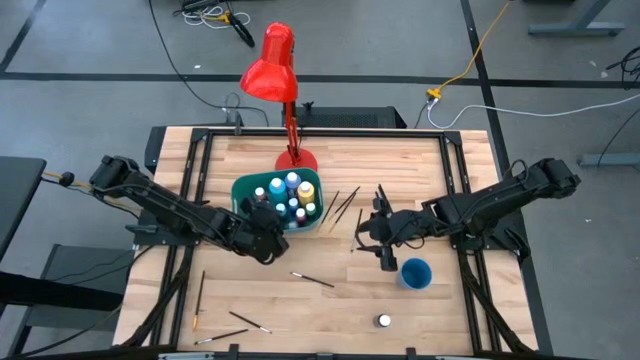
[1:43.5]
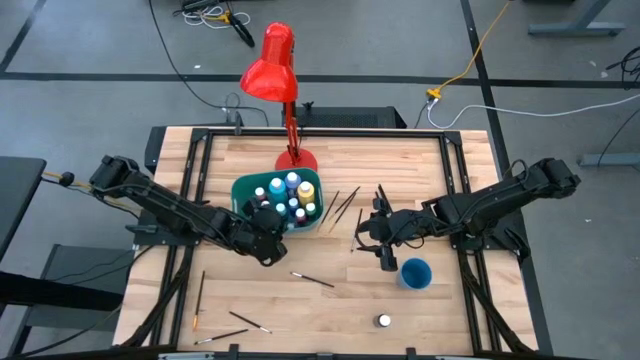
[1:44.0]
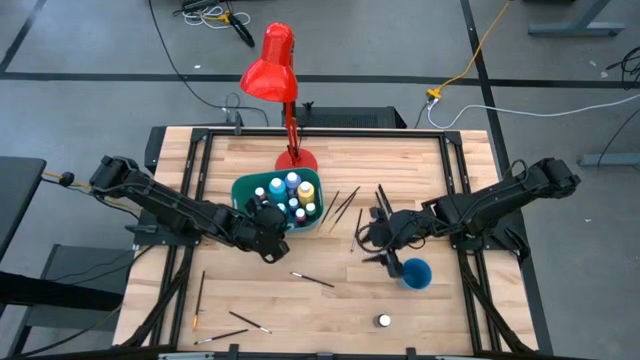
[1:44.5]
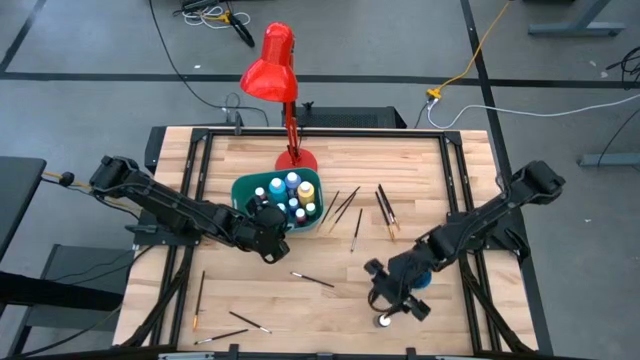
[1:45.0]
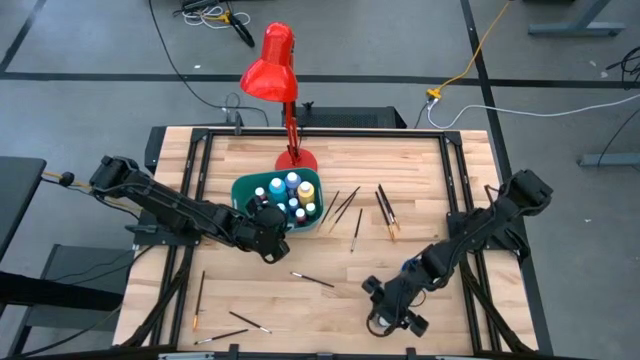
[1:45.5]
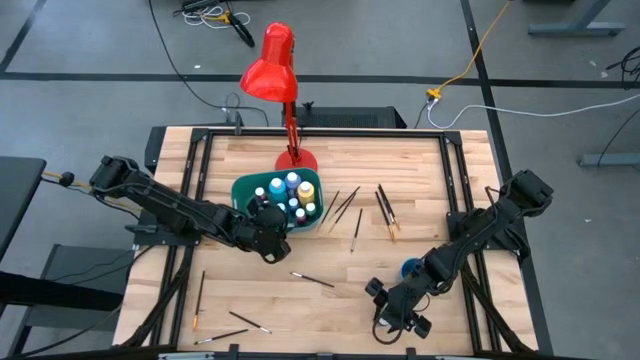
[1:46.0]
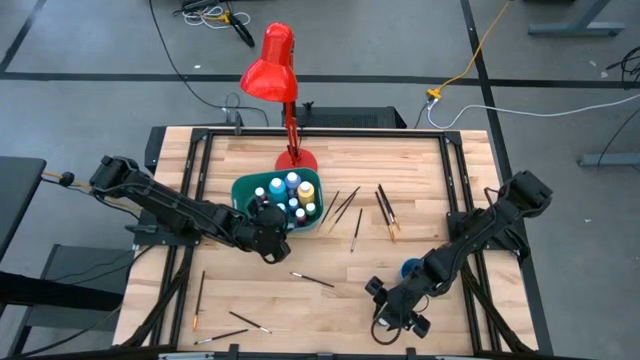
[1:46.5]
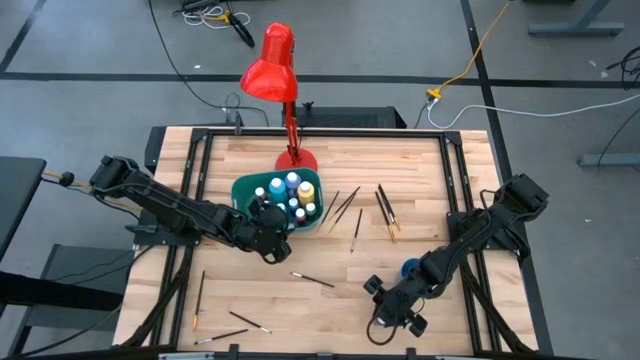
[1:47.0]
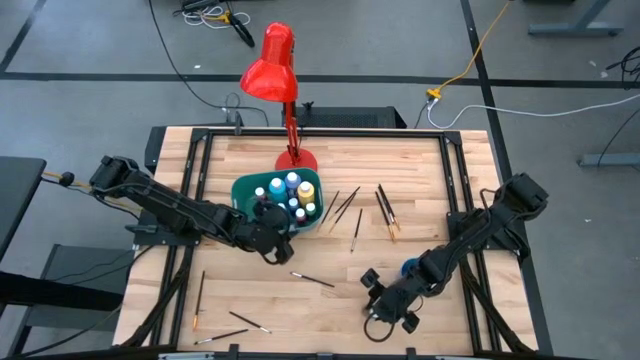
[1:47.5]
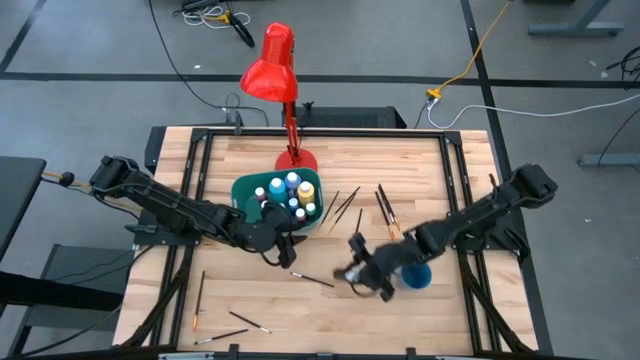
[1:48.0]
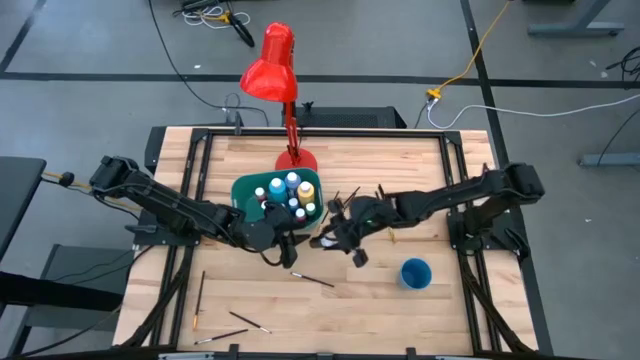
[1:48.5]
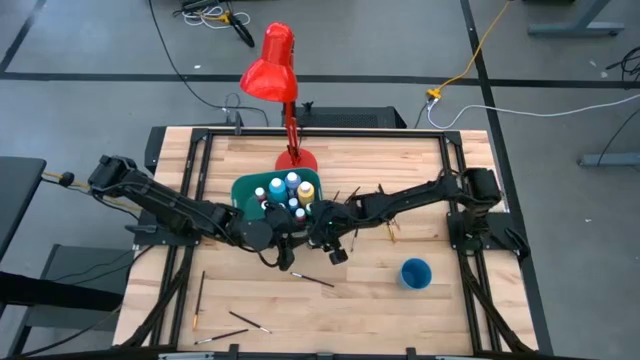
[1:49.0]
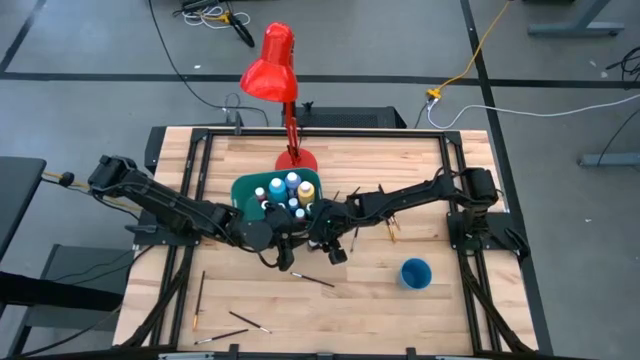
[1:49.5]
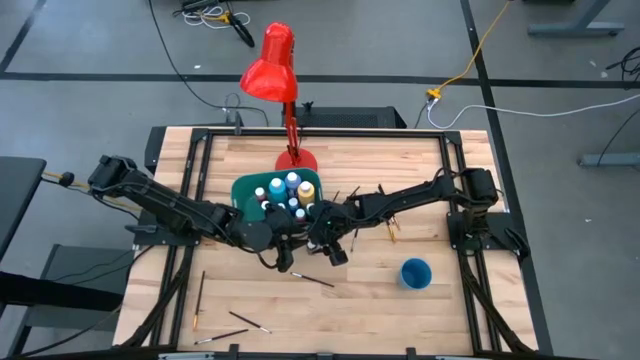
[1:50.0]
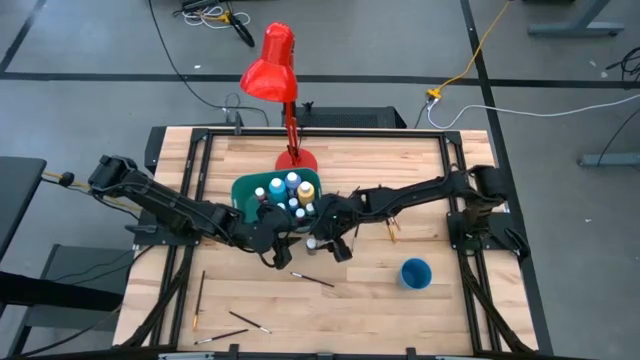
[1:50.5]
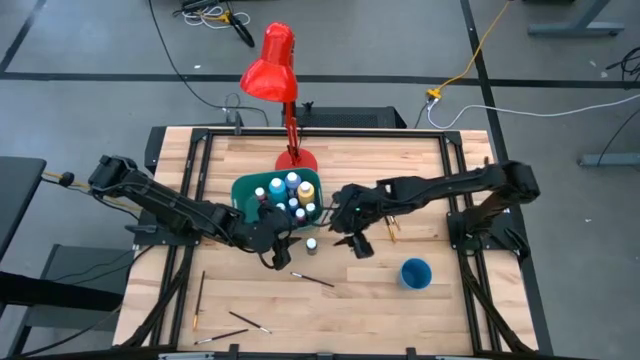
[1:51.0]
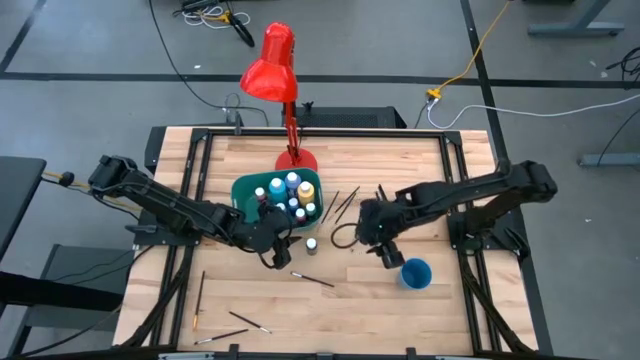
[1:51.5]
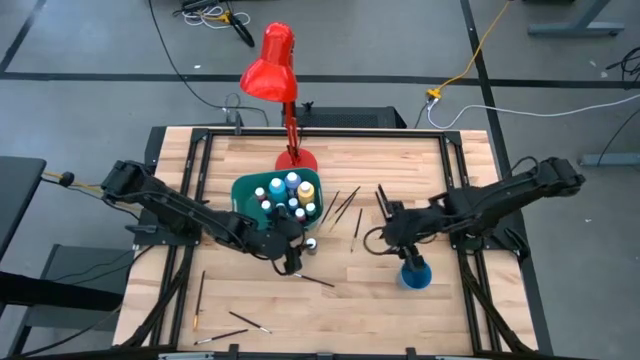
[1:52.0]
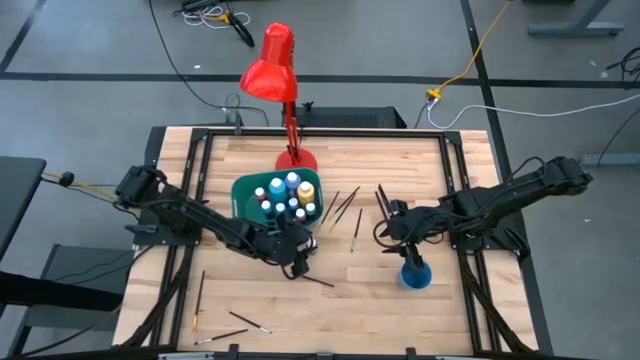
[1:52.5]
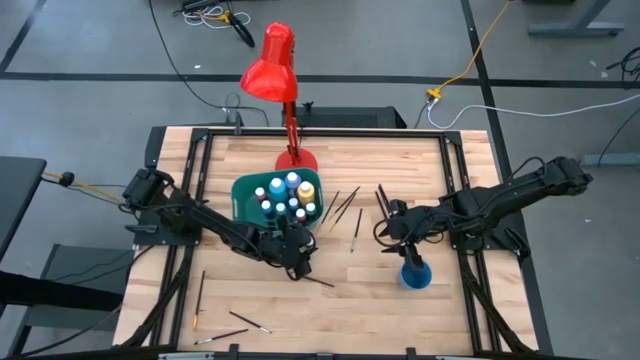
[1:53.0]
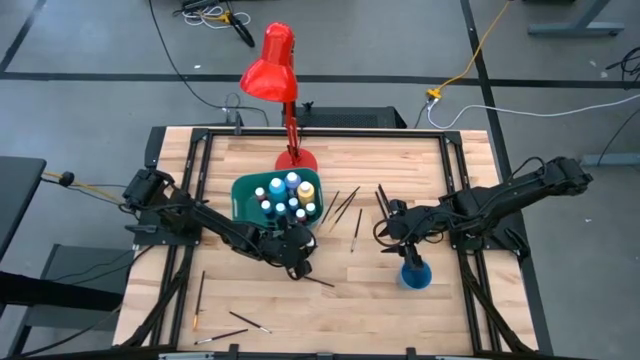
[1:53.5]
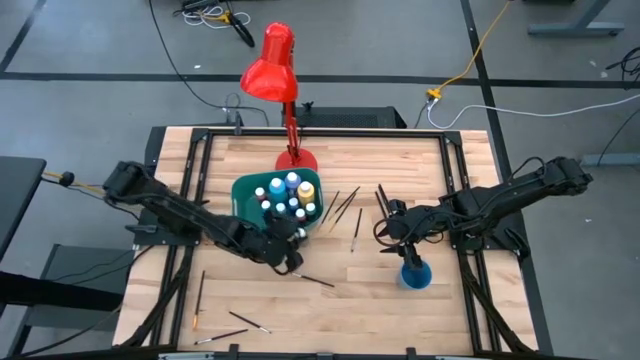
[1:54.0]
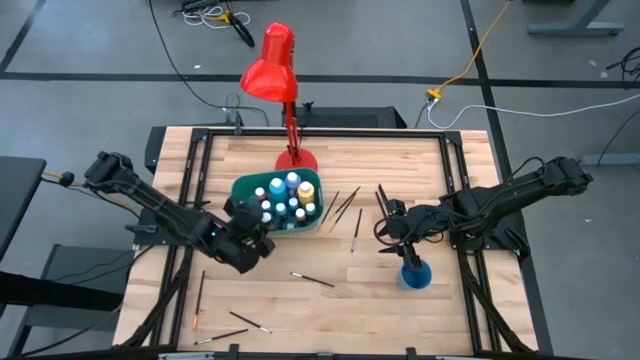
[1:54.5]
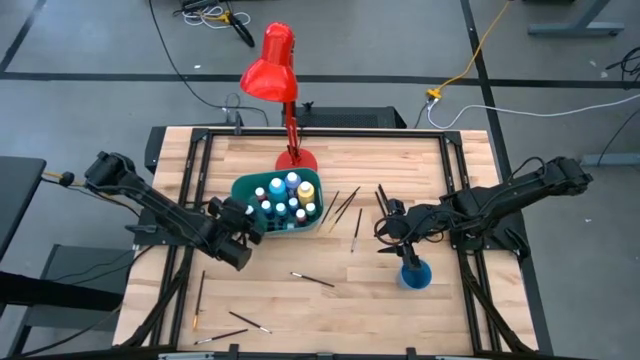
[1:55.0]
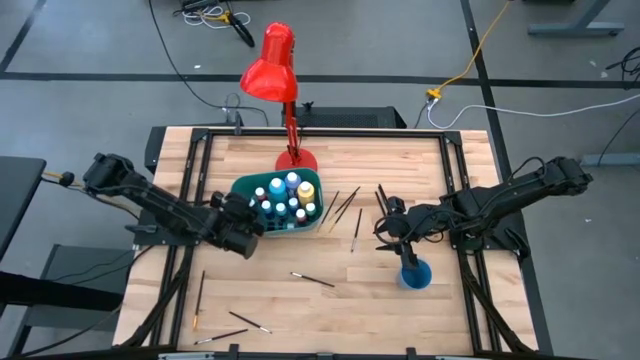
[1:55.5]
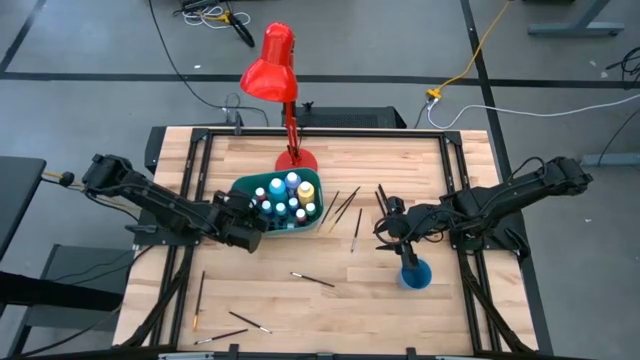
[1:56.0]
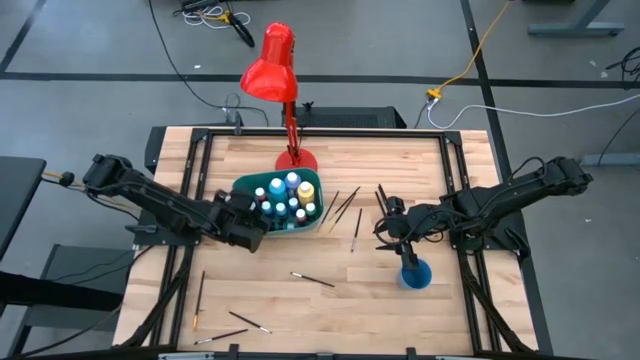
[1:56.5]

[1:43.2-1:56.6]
Task: Pick & Place Paint Supplies
Put the small black paint bottle into the green bin

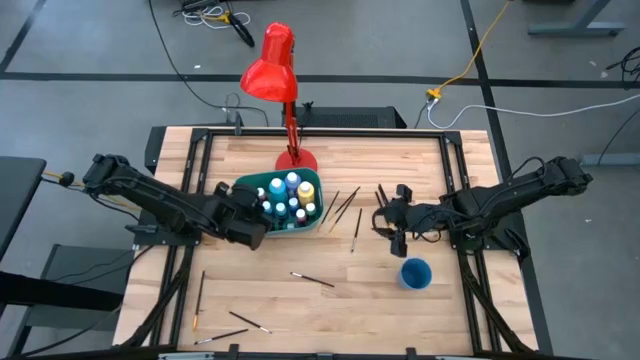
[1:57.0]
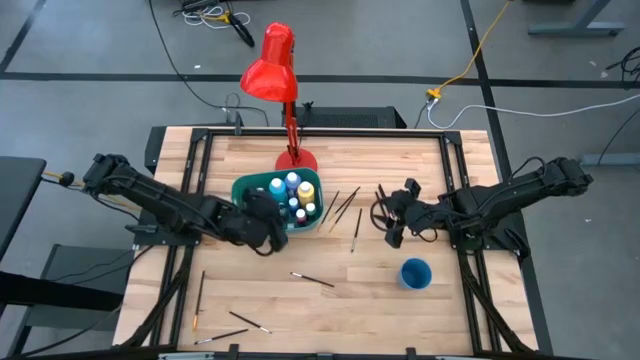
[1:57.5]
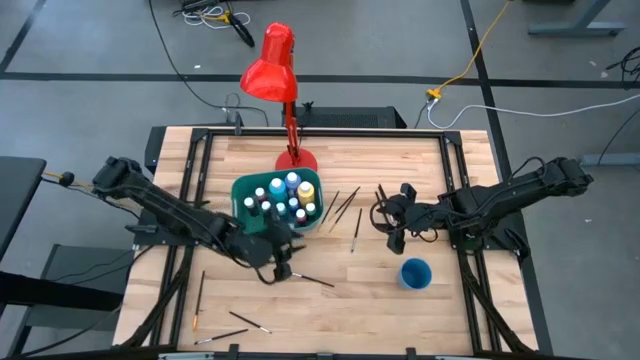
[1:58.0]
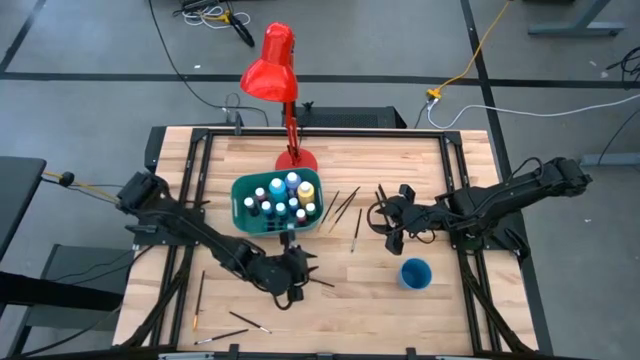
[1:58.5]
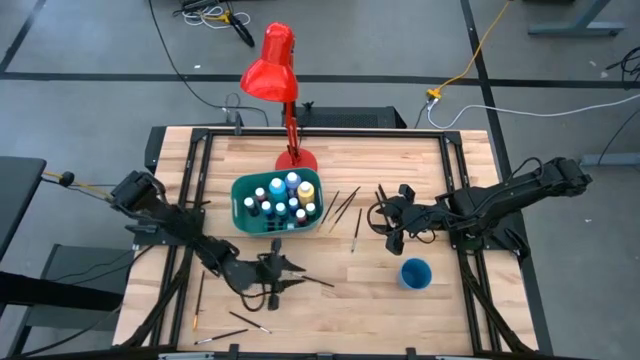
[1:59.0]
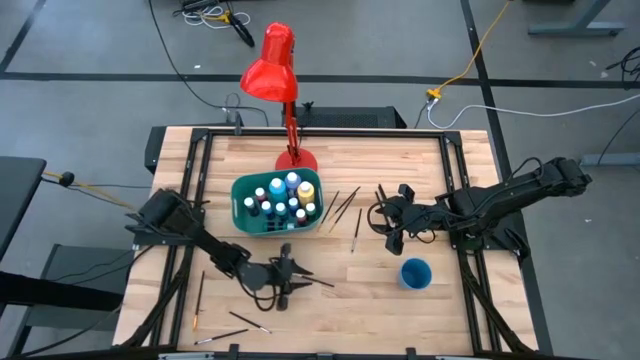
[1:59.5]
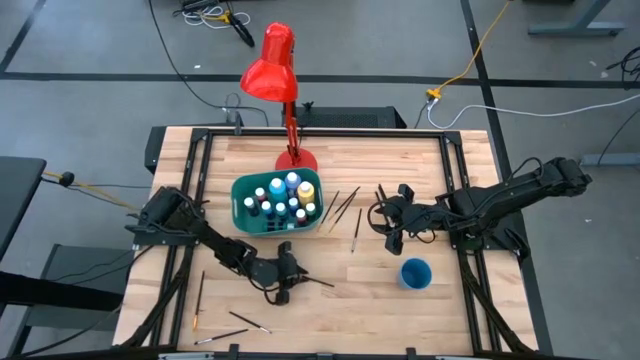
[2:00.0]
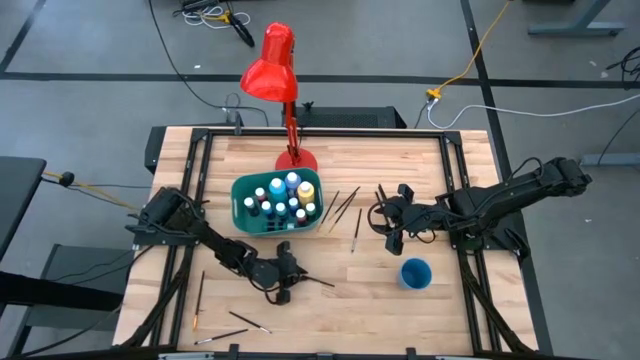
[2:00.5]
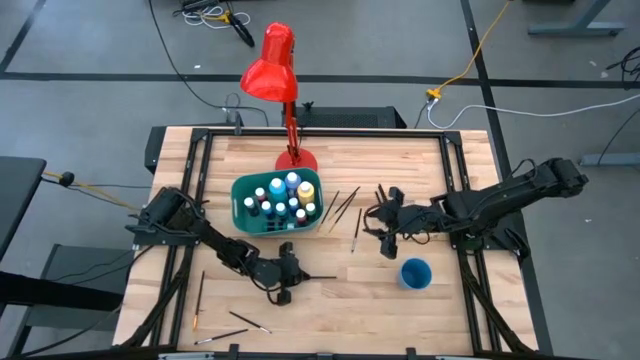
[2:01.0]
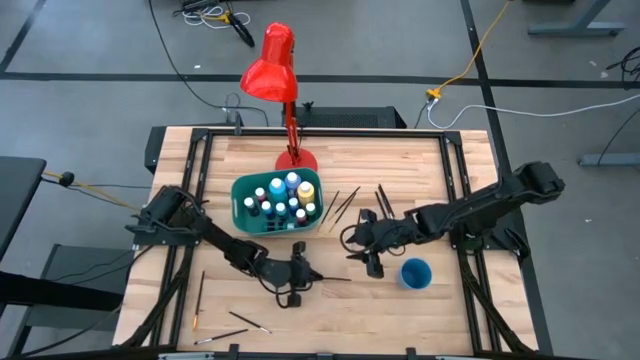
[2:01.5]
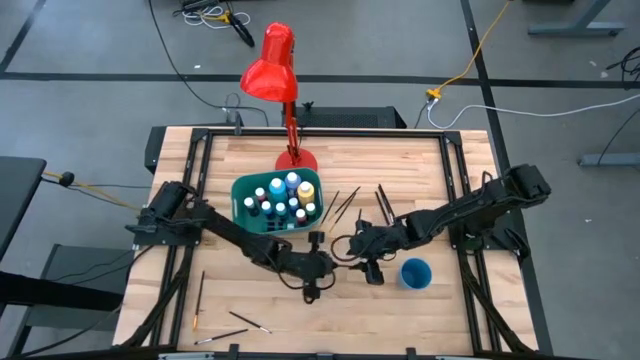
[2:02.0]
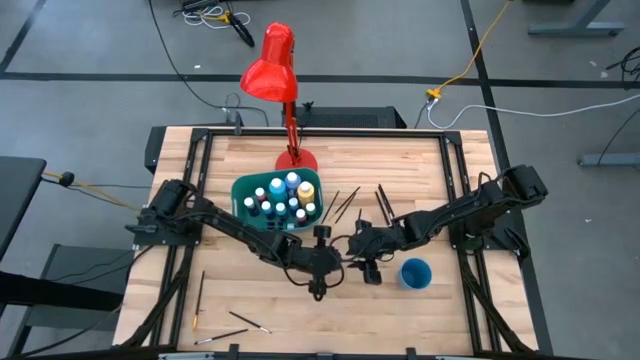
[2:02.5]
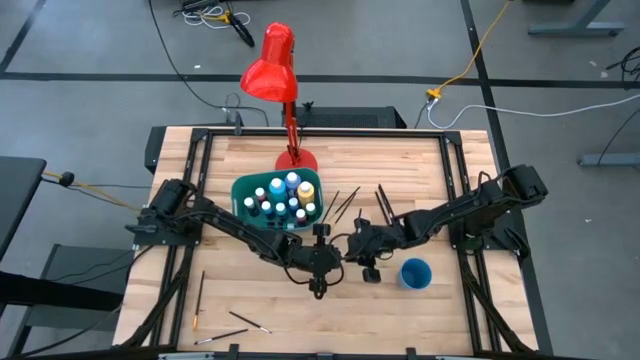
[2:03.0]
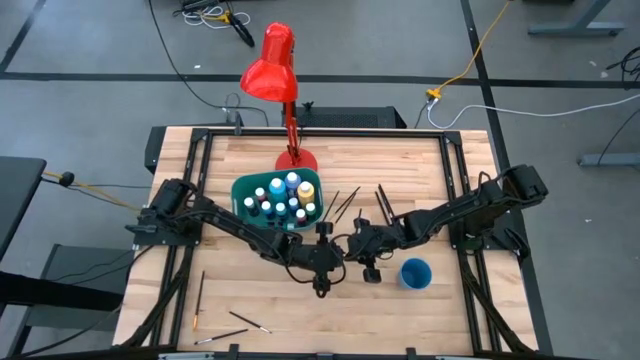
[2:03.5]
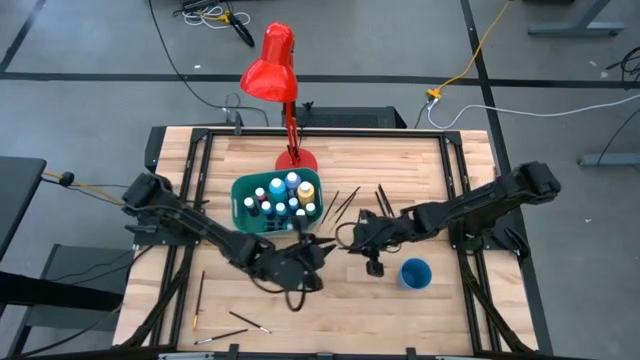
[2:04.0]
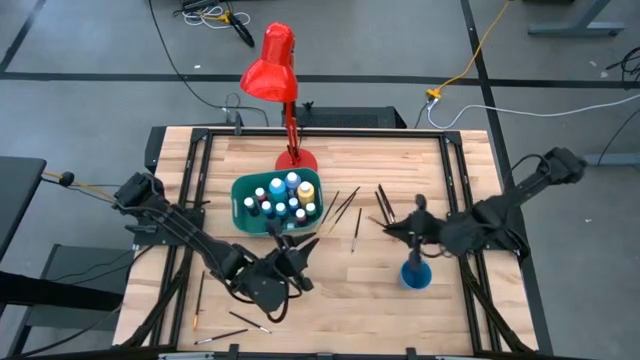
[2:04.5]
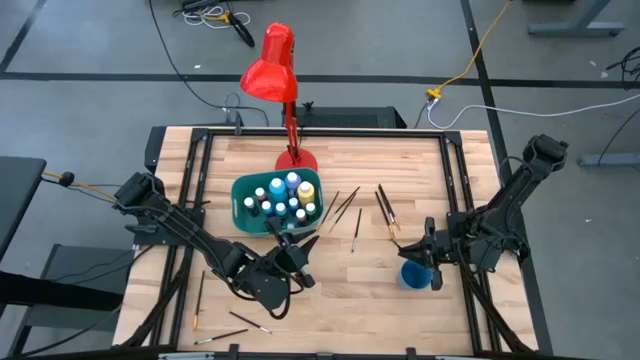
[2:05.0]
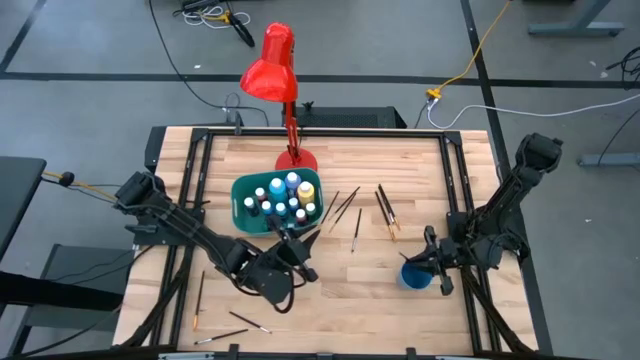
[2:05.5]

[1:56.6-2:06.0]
Put the silver paint brush into the blue cup
